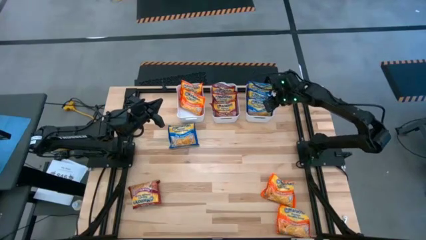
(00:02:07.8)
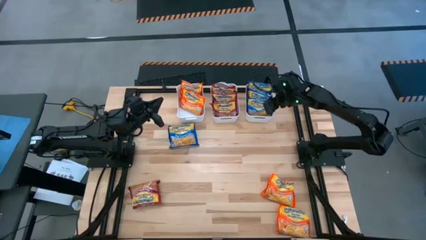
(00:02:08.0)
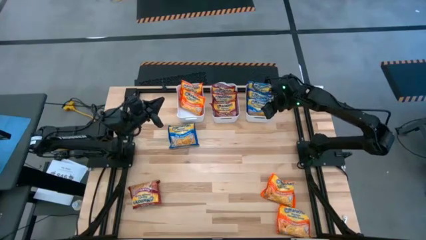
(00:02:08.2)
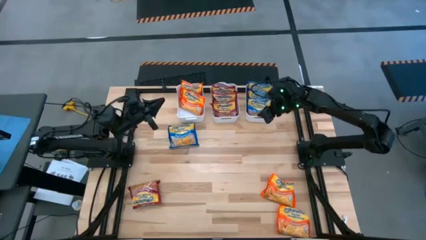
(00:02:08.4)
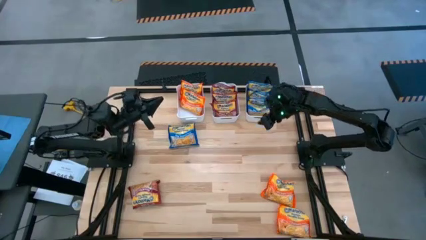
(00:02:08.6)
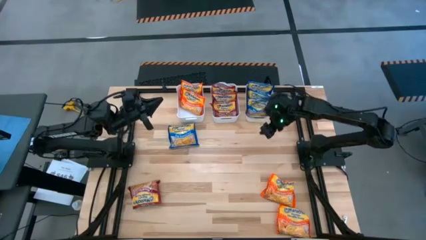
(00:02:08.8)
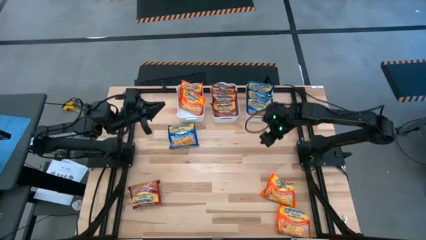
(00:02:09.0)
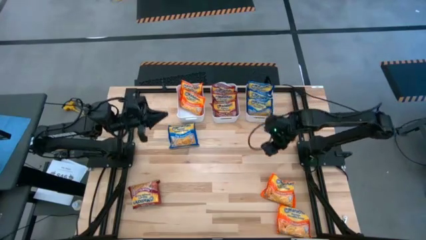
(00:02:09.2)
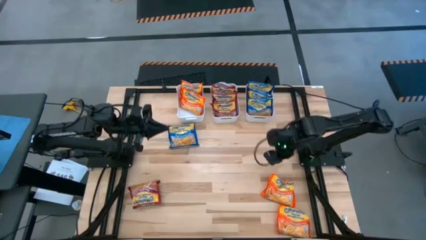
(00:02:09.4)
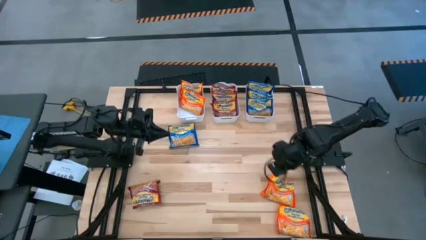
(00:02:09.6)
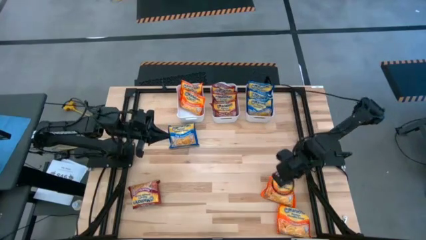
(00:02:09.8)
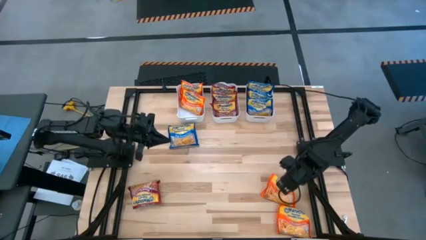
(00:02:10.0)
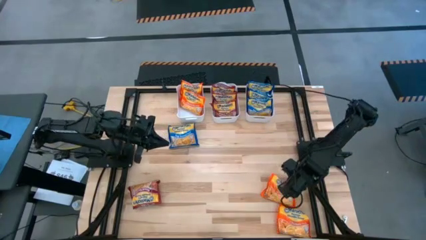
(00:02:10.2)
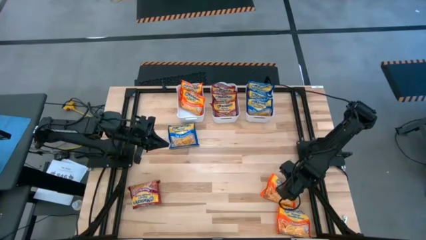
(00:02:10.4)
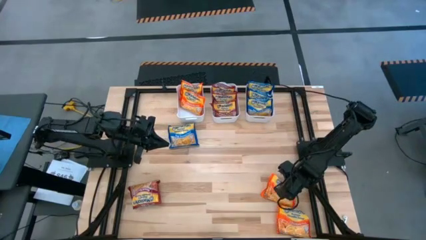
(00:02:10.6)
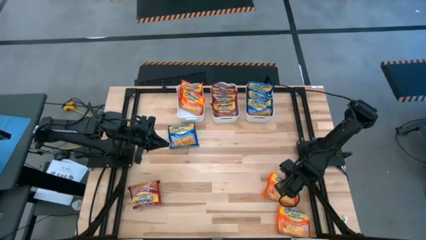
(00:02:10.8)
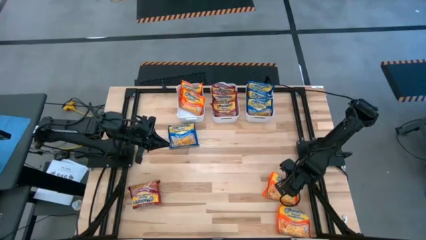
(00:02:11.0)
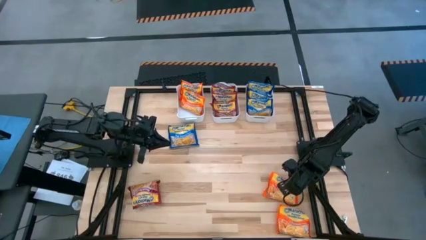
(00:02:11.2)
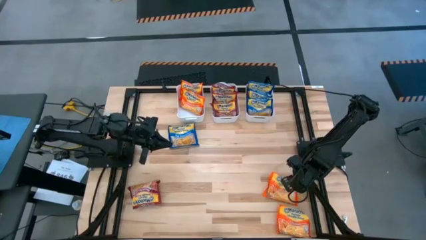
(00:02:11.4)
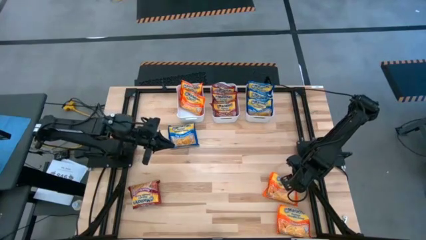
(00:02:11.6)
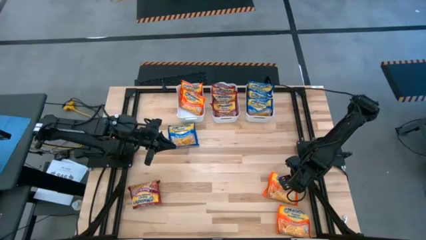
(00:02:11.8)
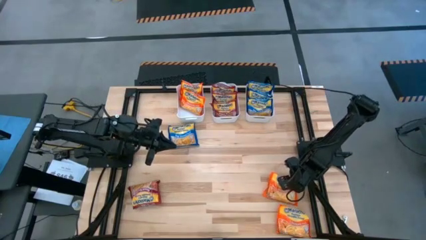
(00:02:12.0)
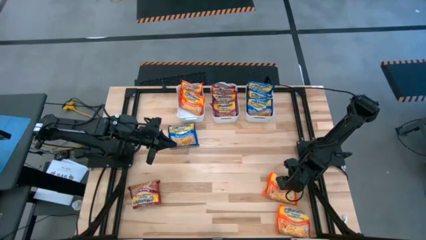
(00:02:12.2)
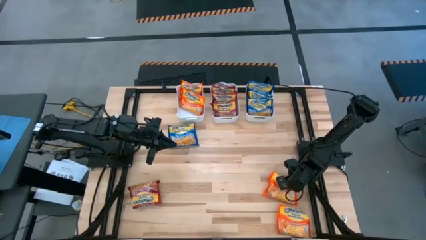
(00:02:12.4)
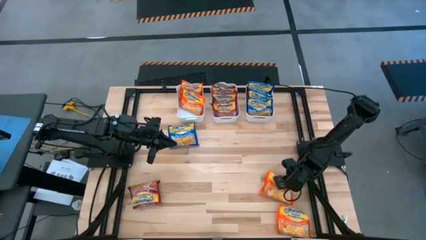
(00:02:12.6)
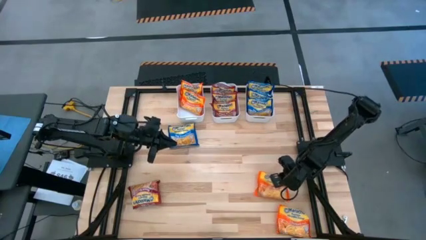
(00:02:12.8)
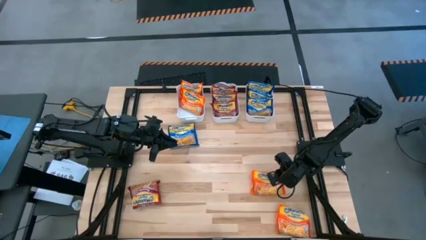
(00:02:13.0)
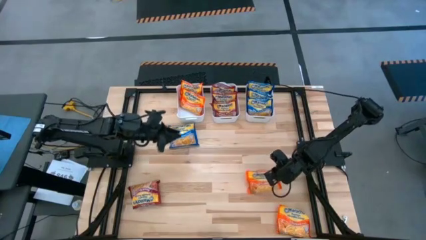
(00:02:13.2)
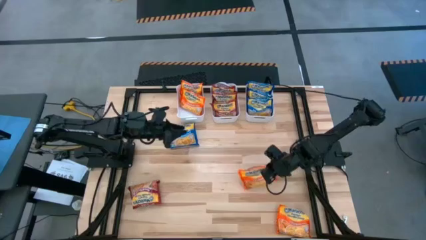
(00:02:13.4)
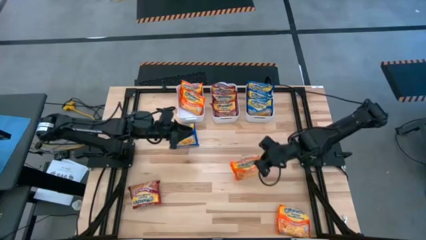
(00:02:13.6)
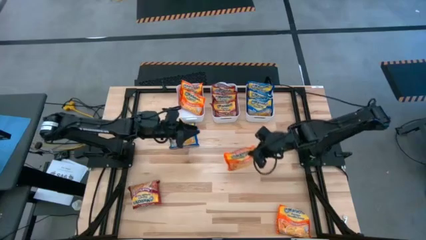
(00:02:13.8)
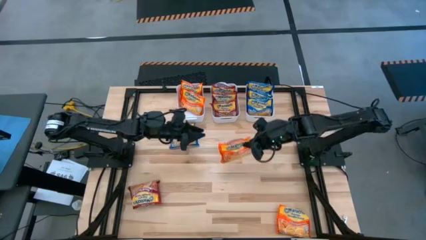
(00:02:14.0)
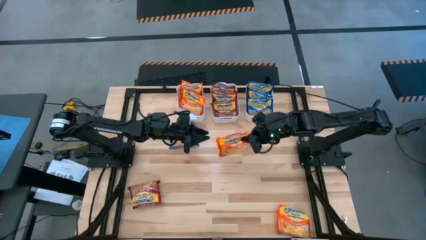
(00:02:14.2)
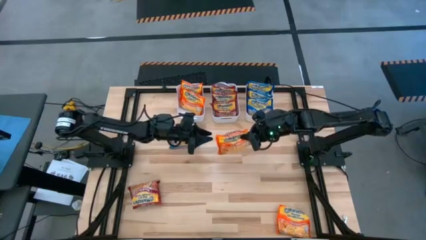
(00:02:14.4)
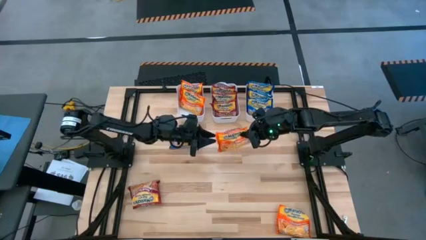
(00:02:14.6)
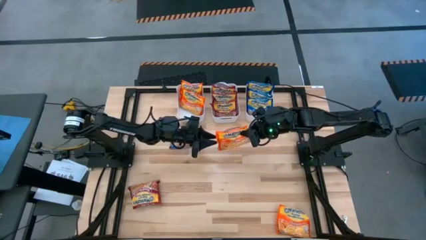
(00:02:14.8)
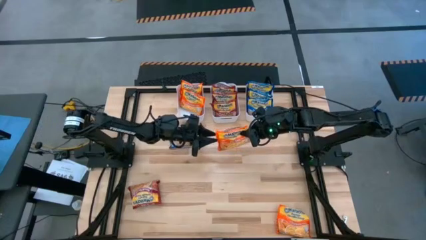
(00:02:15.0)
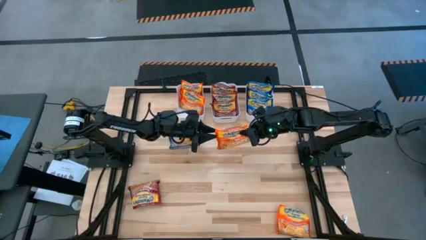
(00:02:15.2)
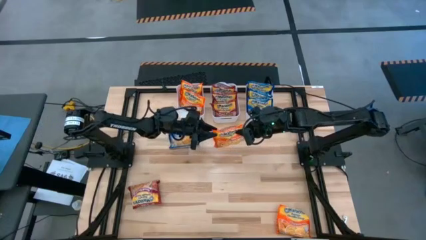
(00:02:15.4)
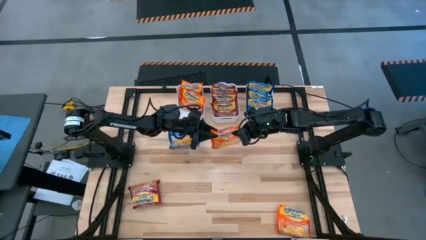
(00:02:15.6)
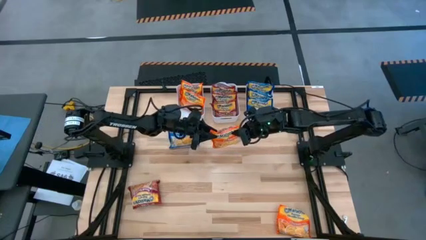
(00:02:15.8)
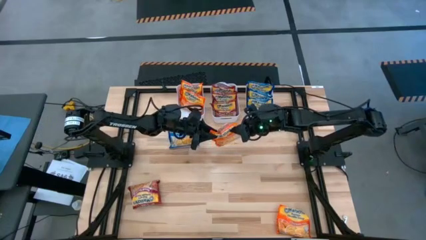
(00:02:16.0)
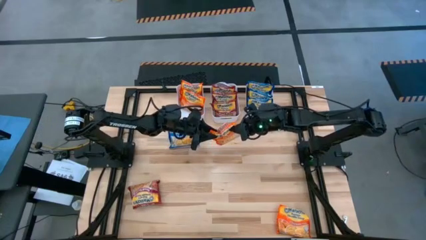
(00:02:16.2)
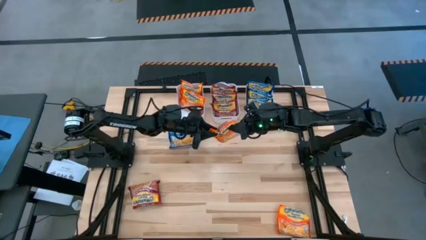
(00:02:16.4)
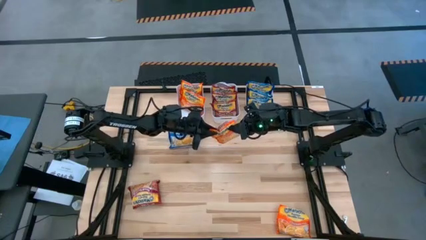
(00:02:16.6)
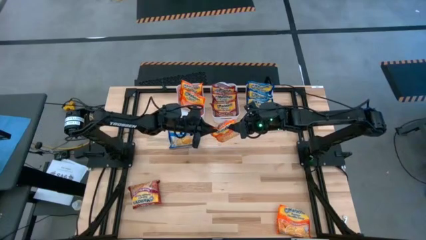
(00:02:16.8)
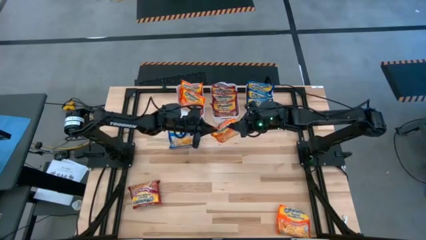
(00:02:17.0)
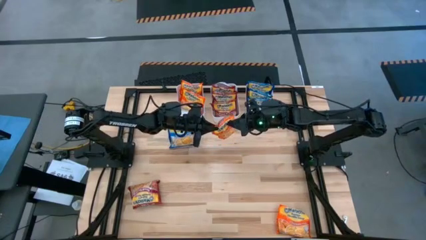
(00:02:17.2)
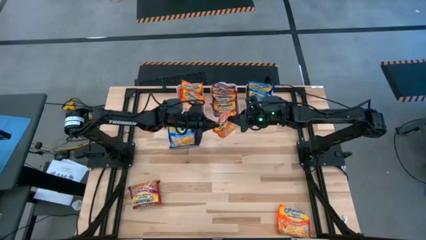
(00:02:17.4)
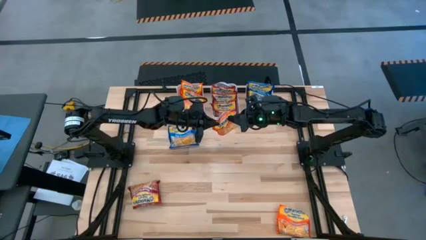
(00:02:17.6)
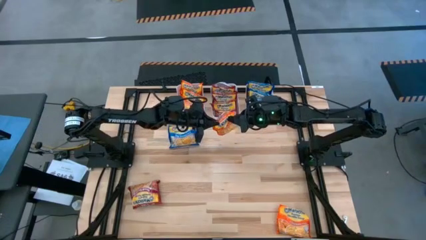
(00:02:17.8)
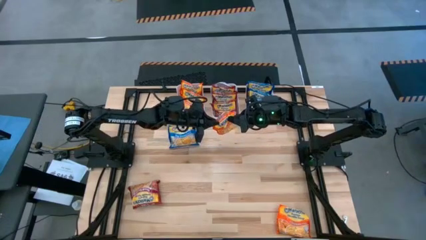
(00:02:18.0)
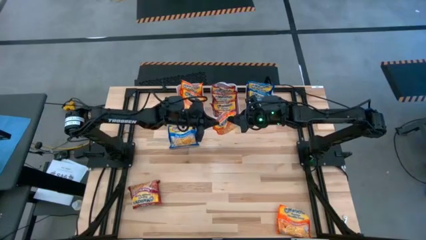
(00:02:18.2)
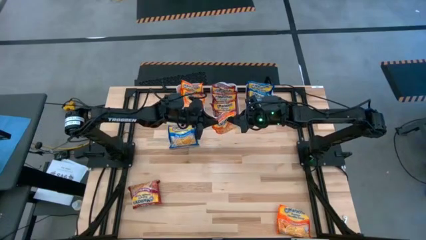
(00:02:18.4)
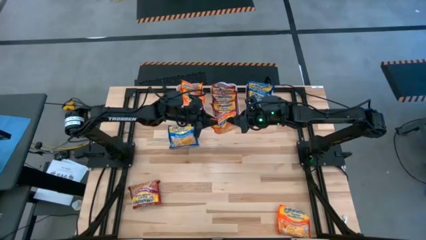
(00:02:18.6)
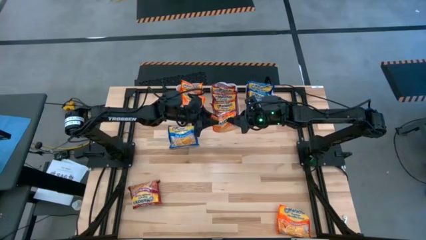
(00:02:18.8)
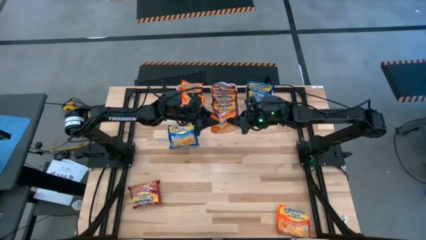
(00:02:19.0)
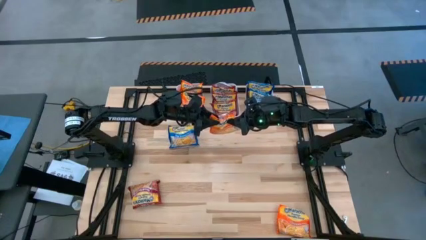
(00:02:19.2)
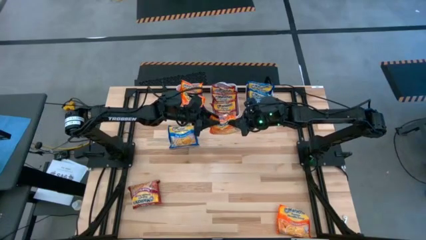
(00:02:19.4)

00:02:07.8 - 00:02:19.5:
Task: Sort Maruchan noodles
Put the orange noodle pack into the left white bin

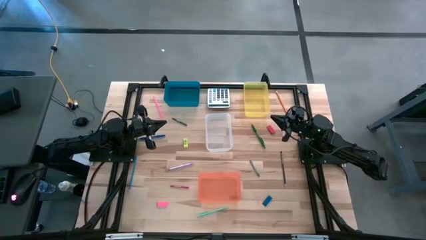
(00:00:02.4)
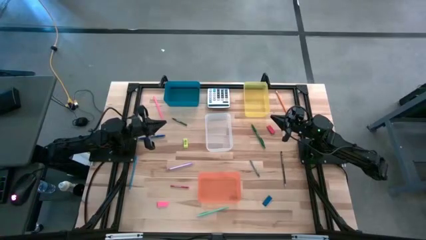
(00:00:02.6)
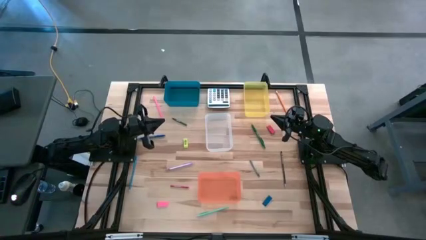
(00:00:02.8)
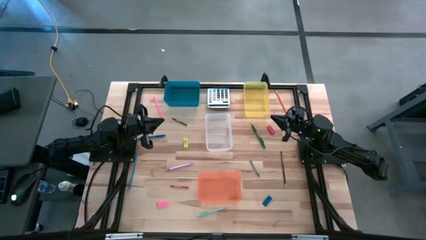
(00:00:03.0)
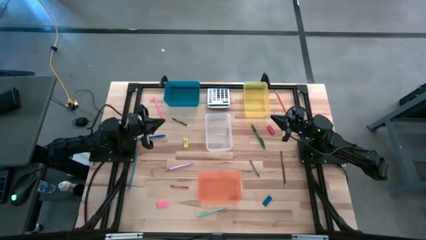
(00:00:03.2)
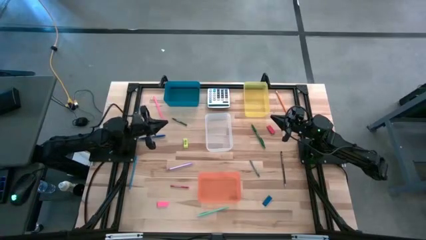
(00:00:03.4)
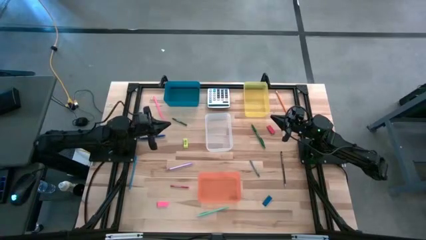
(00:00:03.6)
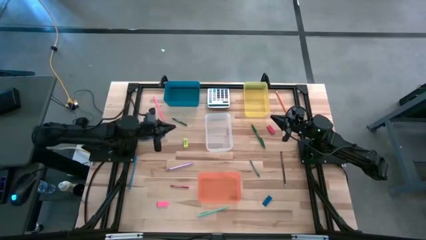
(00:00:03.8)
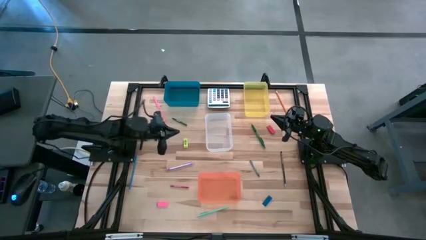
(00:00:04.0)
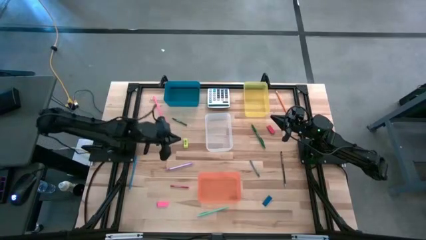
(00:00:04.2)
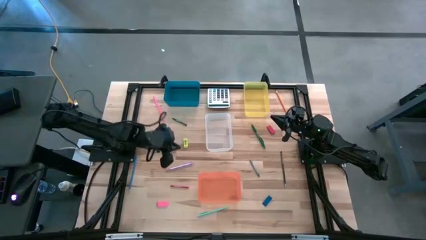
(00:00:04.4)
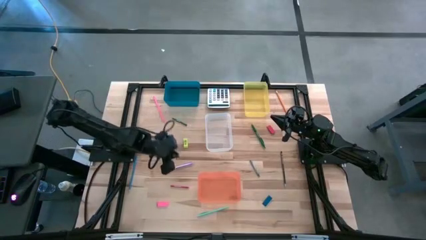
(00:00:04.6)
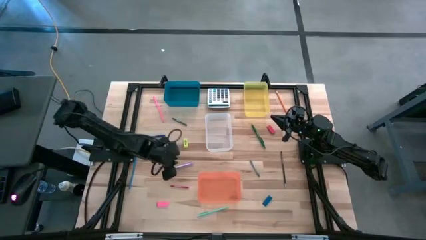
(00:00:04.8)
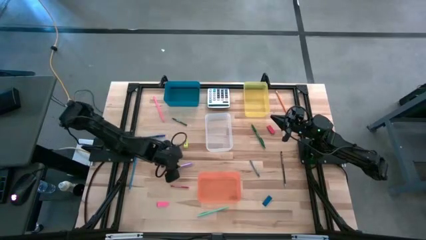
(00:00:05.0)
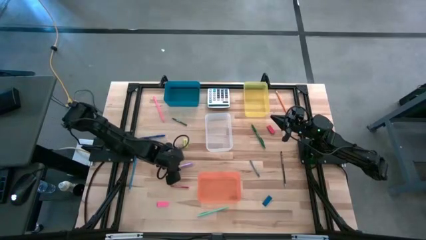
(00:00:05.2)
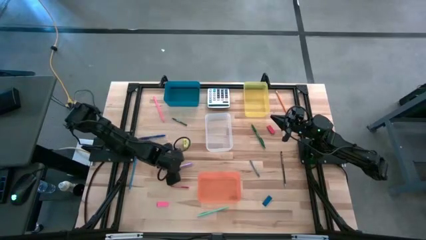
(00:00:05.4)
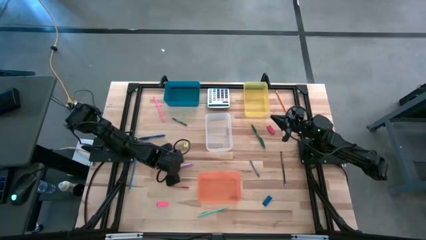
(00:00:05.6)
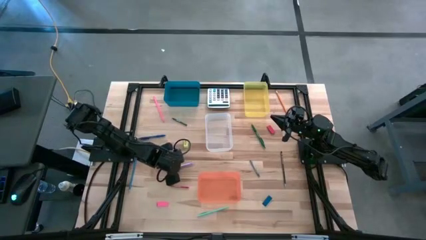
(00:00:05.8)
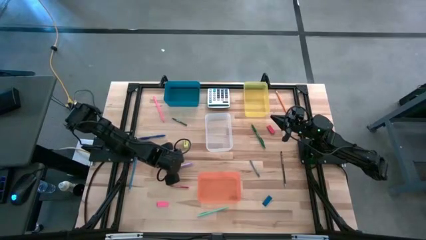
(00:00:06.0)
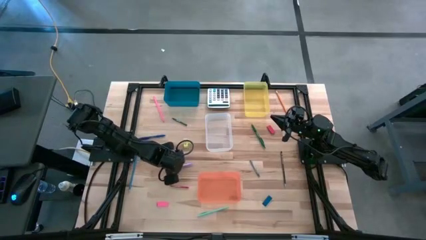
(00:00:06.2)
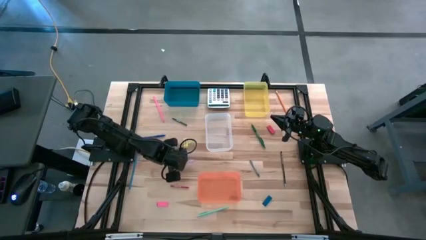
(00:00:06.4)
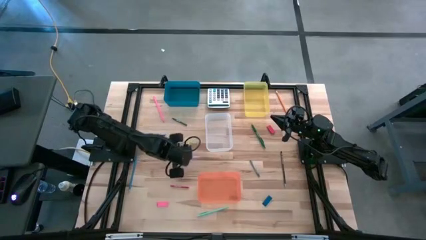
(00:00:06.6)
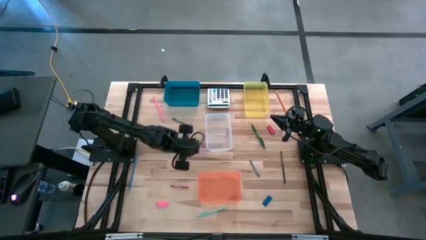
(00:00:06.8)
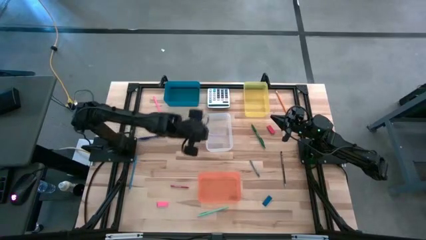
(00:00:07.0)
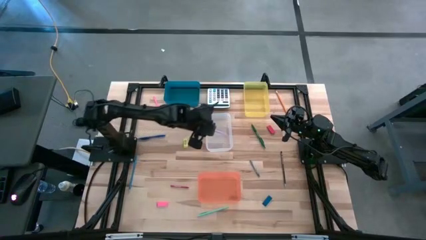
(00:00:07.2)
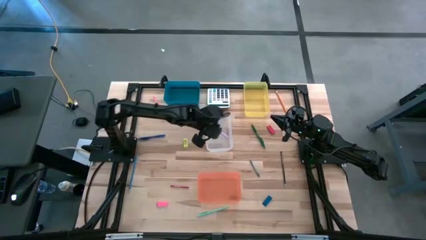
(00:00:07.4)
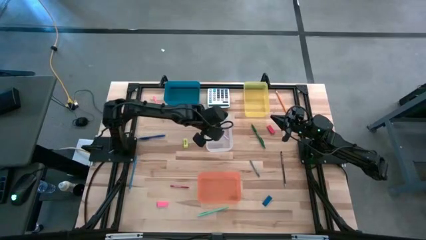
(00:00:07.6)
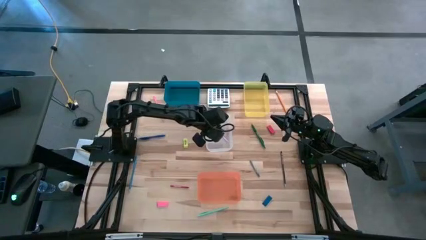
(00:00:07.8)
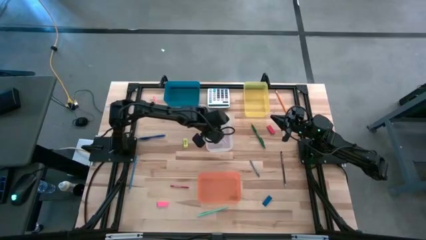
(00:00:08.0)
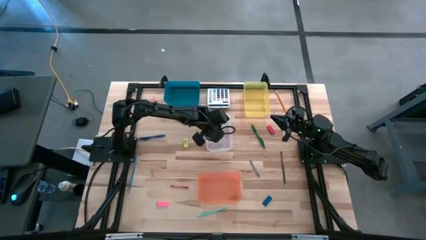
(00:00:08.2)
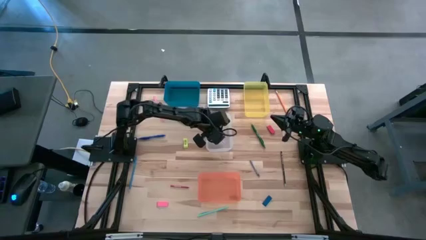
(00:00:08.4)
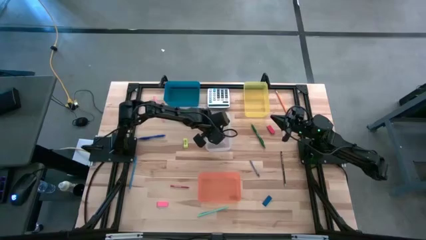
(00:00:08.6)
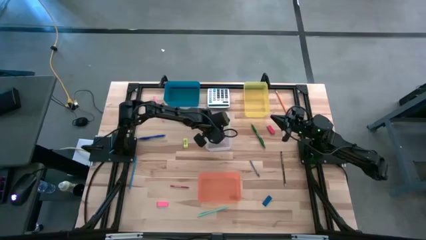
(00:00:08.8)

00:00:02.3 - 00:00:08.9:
Task: Sort crayons/erasers/pens/pencils in bins
Put the violet pen into the transparent bin
